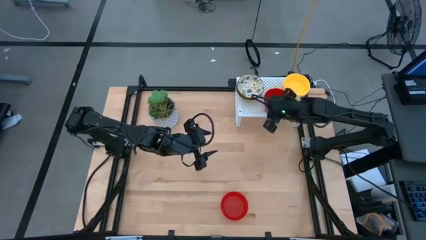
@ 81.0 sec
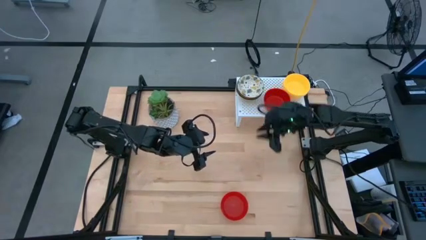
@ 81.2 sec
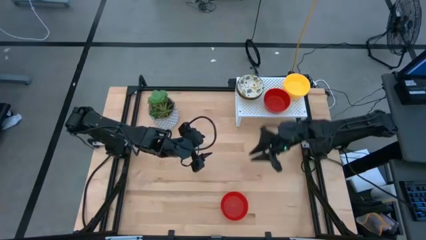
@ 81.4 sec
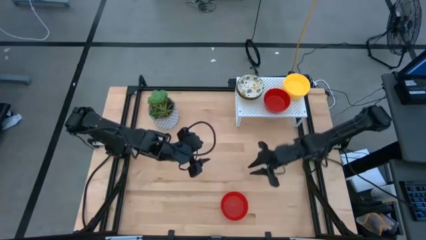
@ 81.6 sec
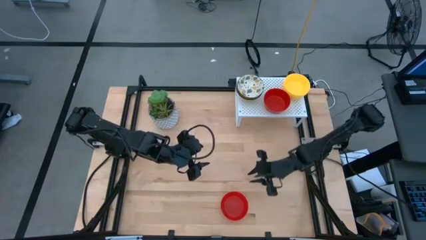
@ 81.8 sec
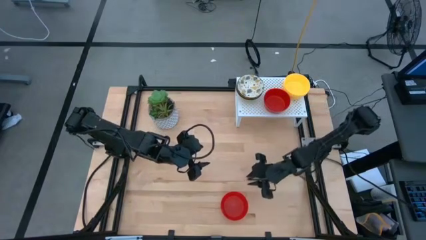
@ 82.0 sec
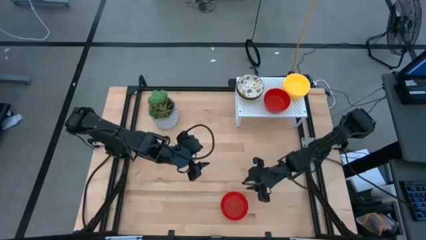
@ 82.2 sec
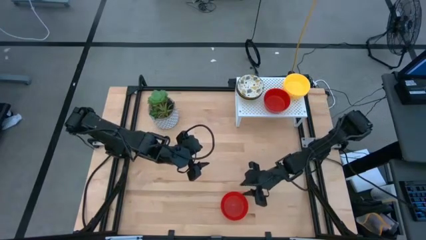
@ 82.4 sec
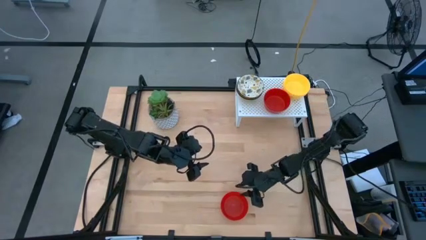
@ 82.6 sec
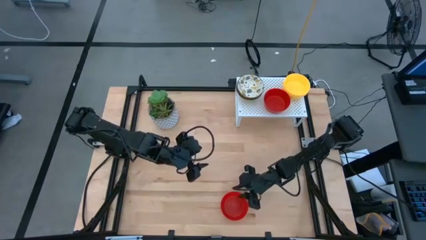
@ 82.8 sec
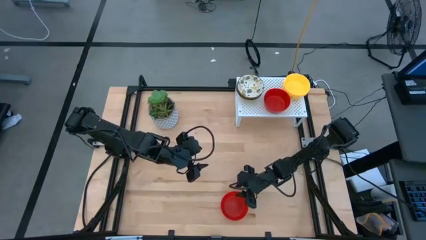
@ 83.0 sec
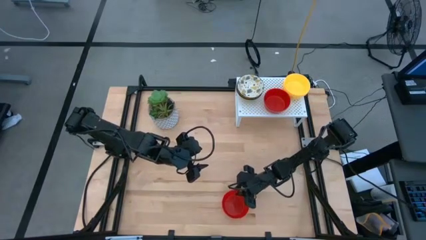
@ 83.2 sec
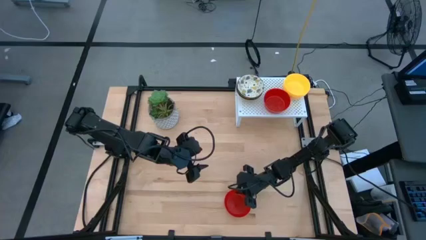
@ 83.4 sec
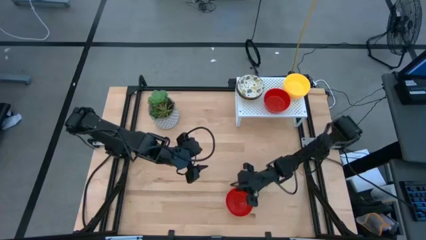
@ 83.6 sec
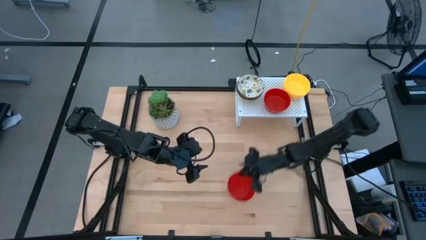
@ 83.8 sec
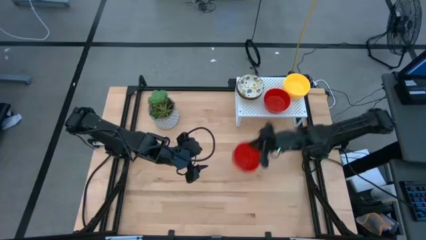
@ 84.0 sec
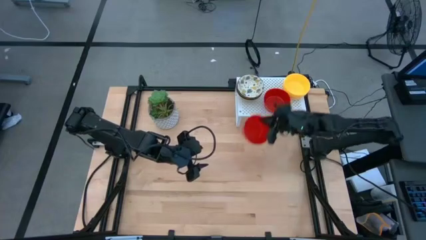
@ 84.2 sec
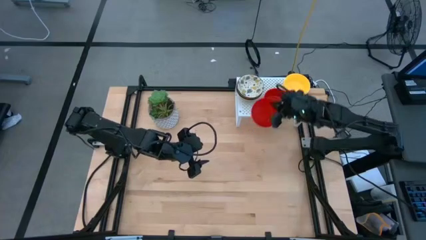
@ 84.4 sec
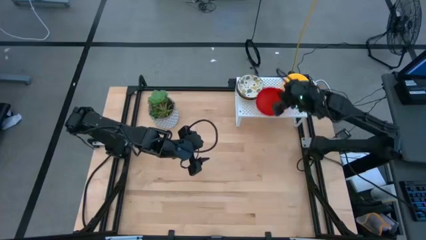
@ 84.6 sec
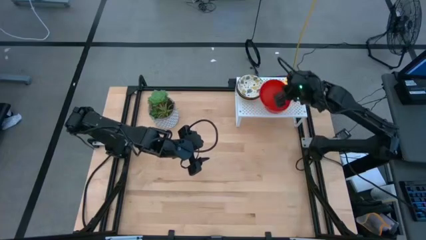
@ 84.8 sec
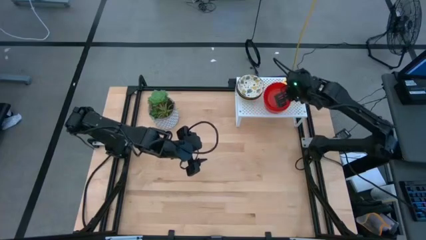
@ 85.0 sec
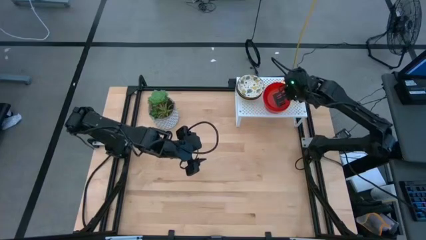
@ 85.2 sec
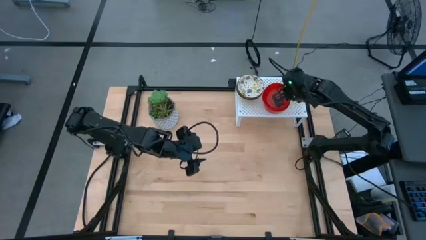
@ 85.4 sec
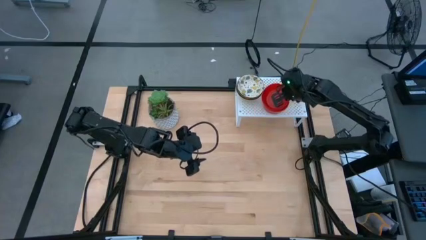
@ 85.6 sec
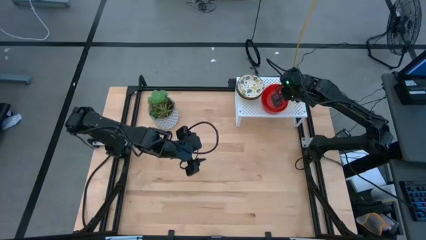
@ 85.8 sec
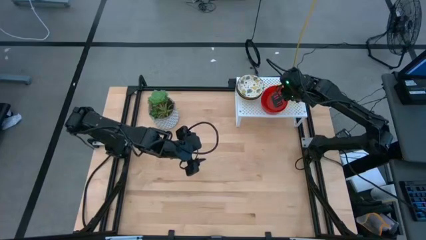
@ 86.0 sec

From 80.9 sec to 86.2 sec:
Task: Pick & Place Mini bowls
Stack the red bowl on top of the red bowl on the shelf

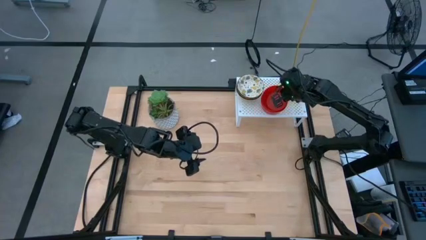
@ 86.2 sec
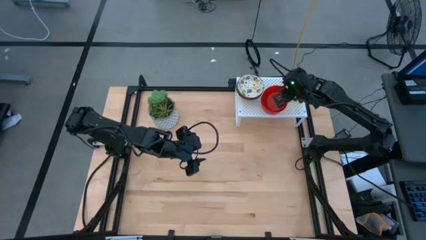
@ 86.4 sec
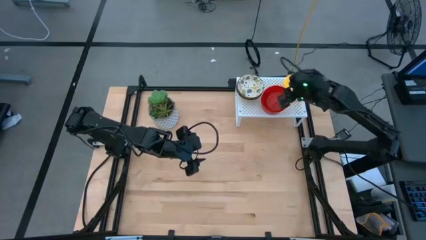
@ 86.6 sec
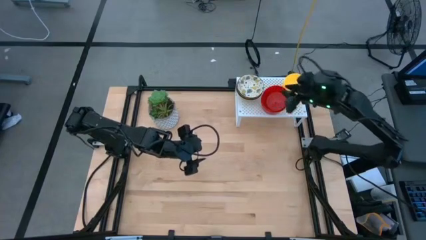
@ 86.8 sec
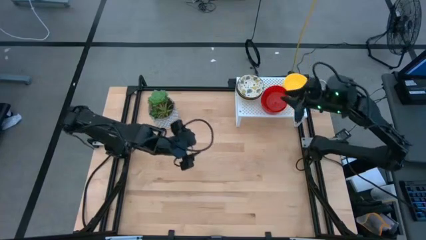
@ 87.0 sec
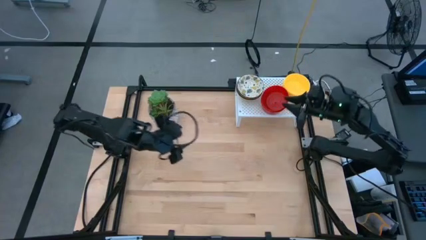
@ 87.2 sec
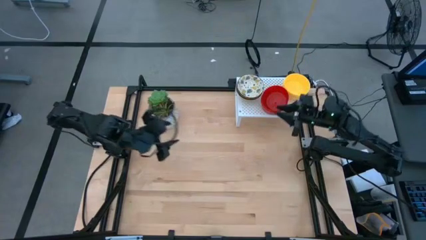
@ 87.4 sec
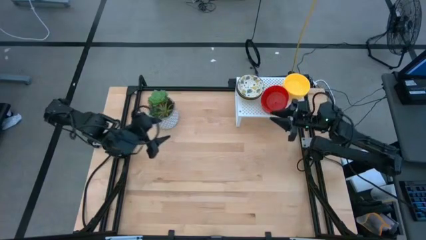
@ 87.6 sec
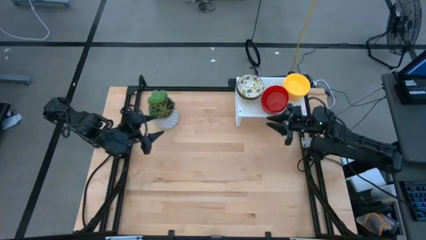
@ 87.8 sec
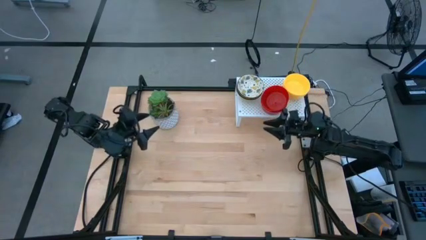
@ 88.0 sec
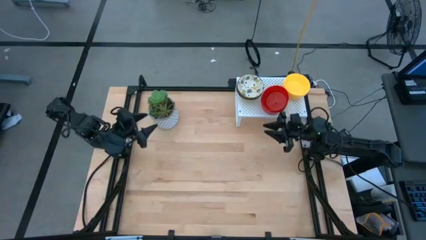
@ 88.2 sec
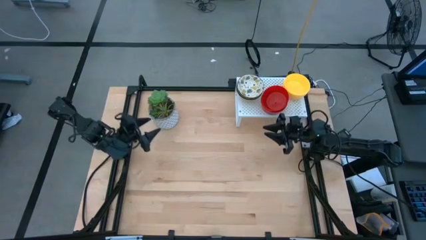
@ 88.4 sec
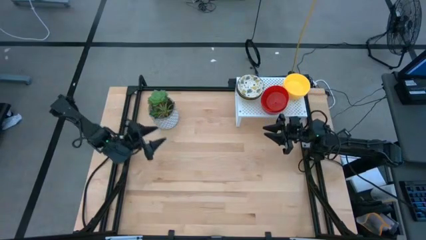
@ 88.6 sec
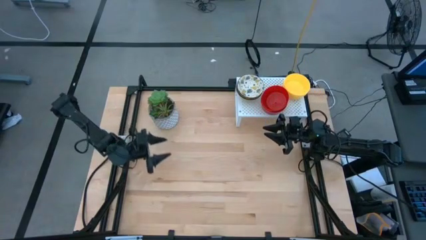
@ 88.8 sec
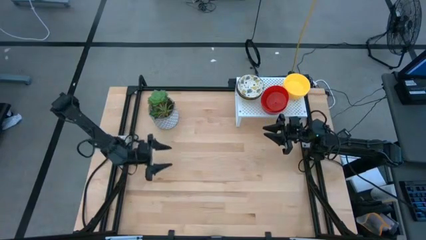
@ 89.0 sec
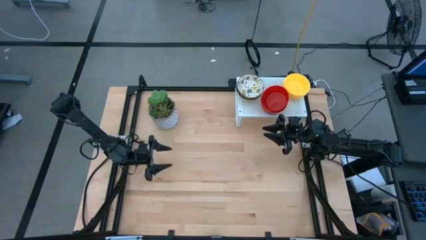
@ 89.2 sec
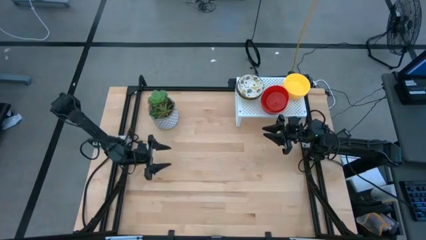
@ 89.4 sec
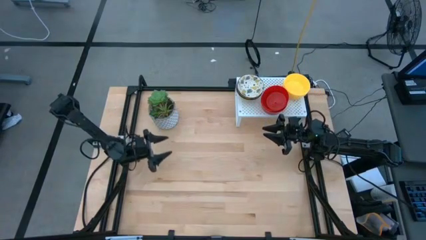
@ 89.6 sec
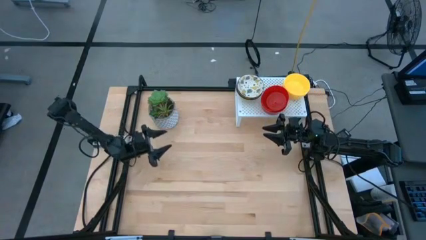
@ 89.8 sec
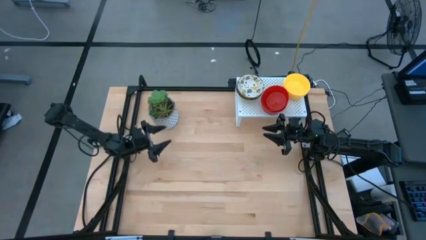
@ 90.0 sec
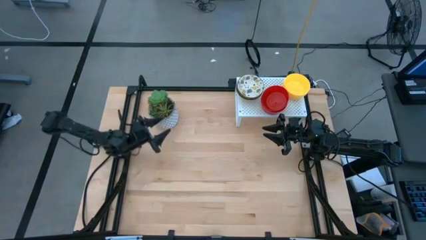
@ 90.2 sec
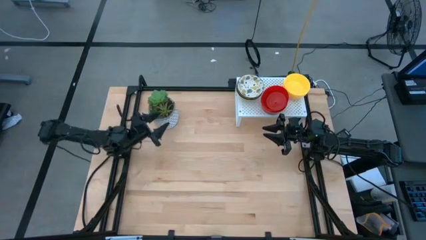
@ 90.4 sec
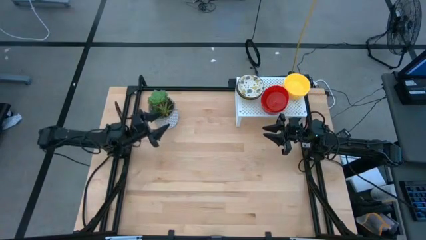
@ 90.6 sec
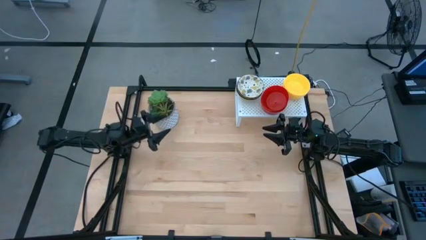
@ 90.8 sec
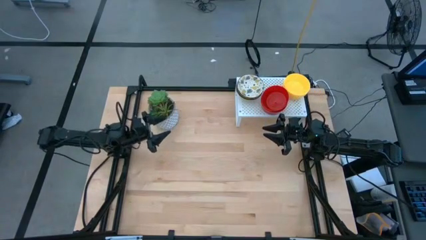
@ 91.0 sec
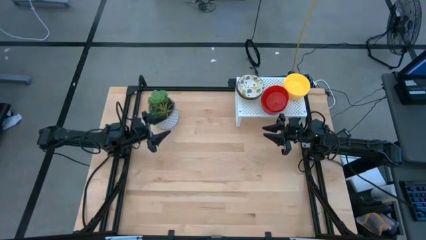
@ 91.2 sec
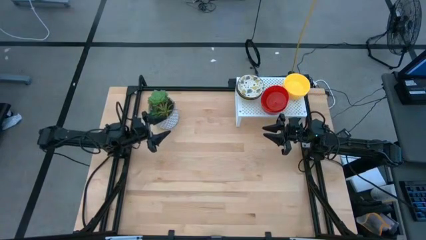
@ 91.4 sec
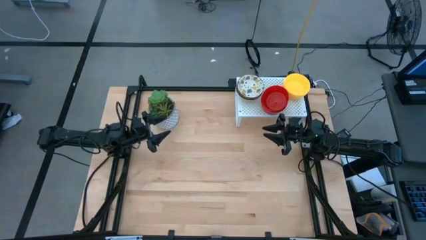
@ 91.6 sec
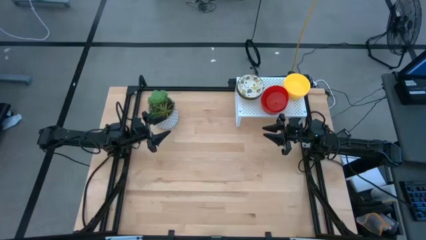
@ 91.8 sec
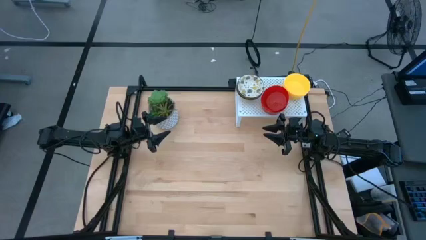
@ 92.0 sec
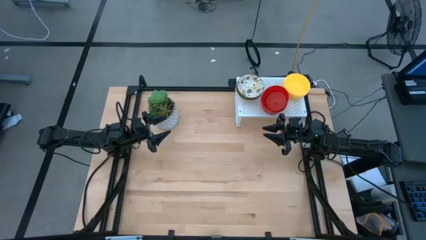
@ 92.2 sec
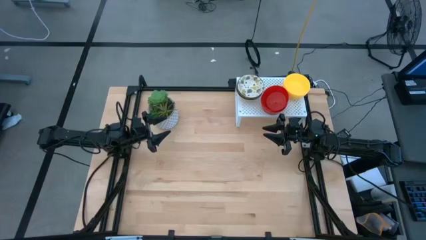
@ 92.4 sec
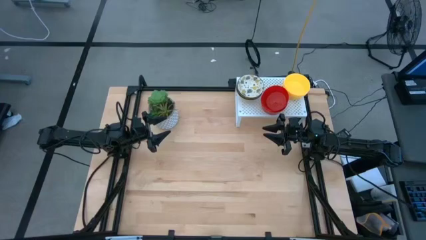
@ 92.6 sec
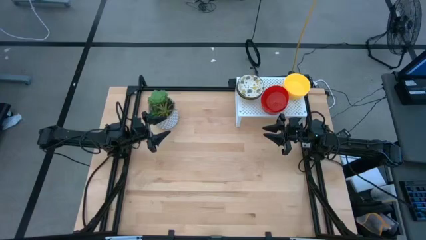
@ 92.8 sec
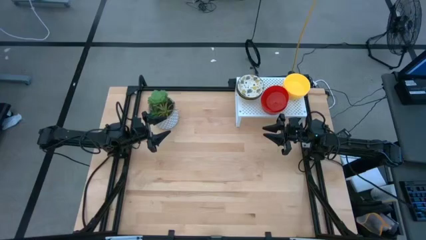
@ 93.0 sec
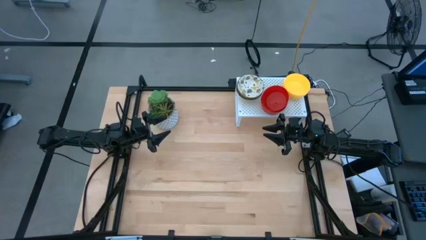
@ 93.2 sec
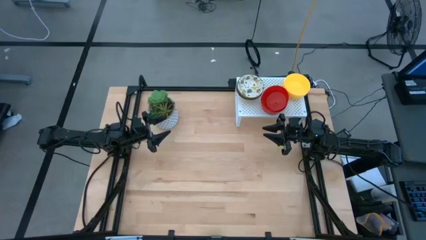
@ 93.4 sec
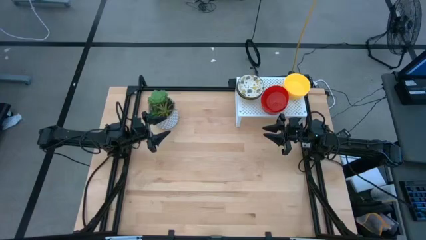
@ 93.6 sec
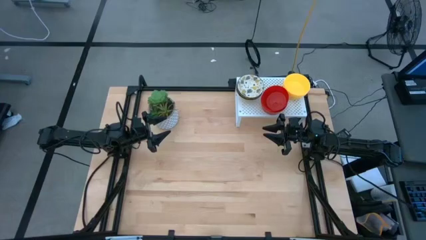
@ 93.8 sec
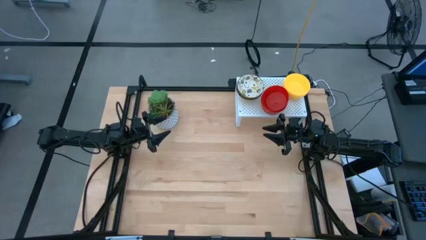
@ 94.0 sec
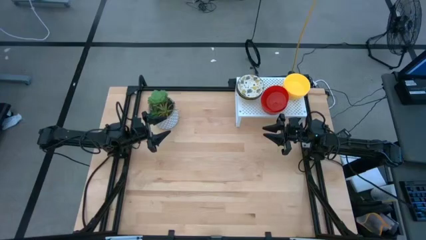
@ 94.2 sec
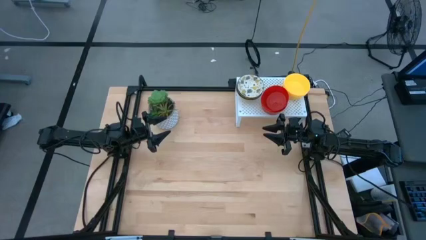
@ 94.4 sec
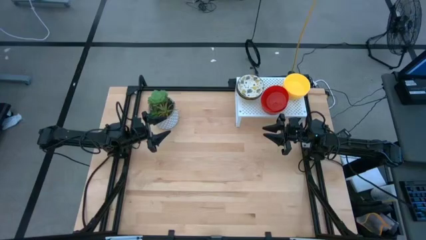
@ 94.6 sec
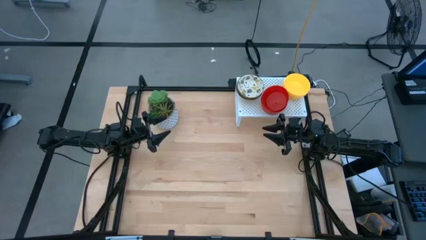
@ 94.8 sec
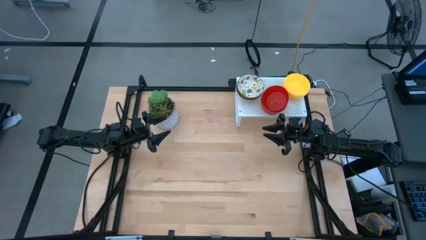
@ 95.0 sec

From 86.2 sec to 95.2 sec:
Return to Home Position

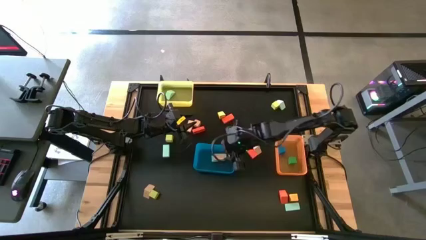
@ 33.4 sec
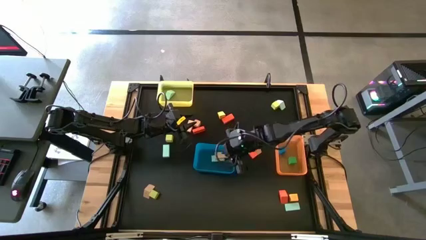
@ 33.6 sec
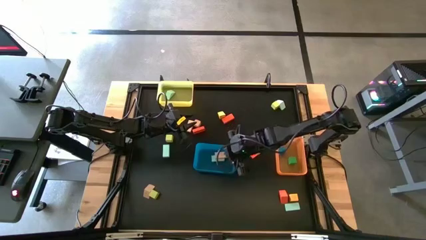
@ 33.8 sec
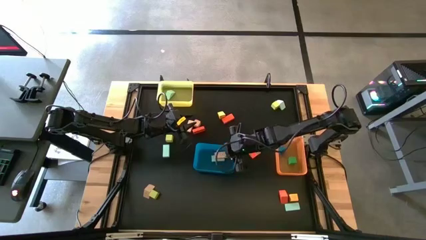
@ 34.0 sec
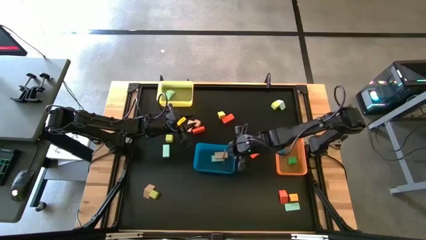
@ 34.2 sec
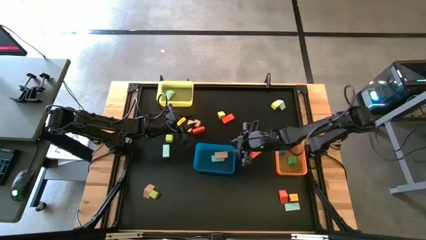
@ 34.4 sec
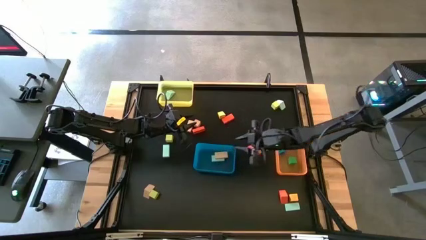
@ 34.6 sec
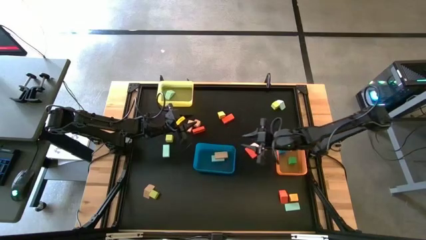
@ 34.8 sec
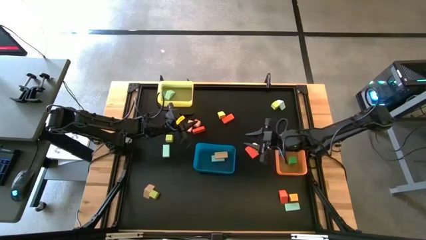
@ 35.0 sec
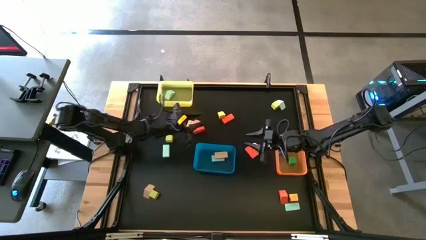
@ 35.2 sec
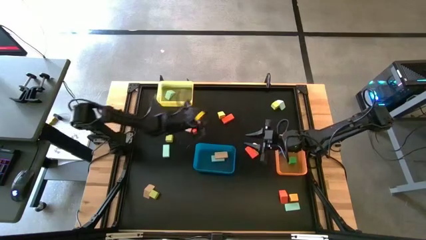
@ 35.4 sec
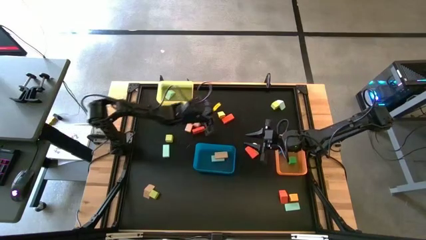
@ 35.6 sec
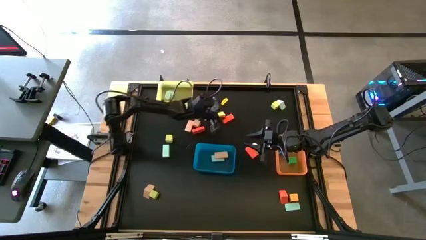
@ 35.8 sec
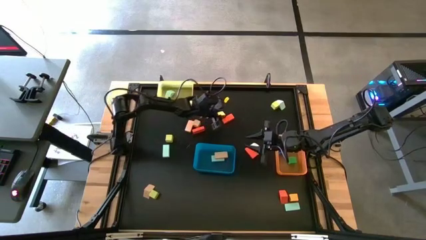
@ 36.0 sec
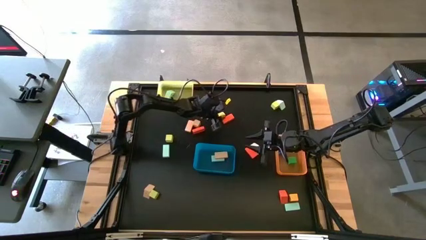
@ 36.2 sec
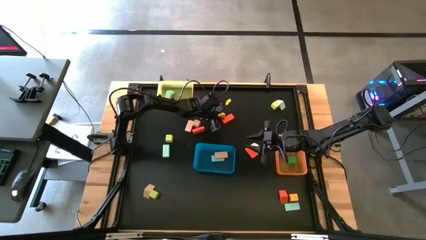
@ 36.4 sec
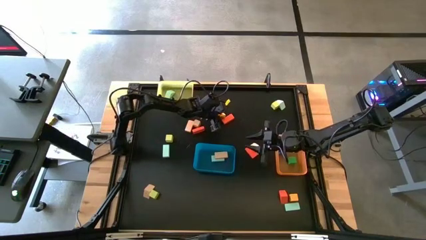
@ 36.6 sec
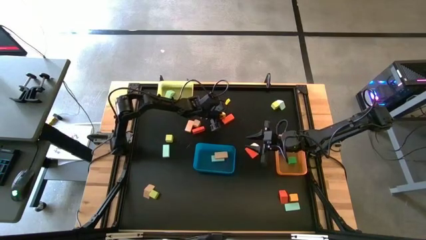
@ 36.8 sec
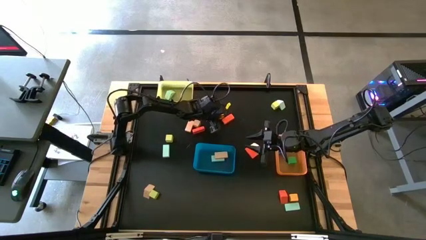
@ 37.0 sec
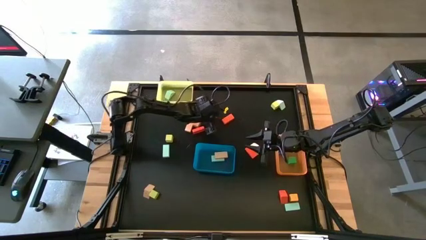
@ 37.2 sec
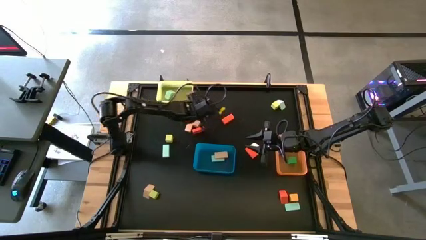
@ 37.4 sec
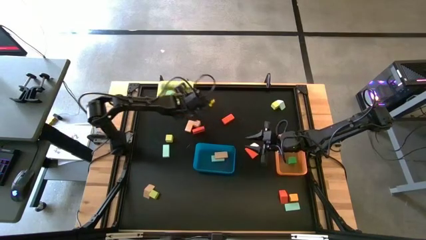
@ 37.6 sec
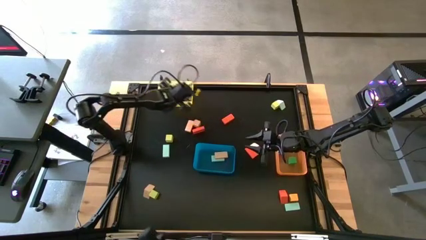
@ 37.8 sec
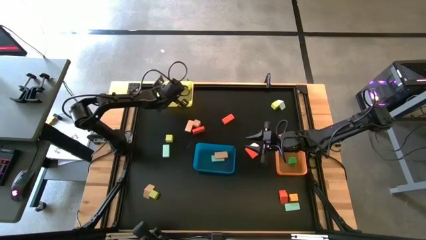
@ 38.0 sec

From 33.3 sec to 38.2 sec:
Task: Sort blocks by size
Put the yellow triangular block into the yellow bin
